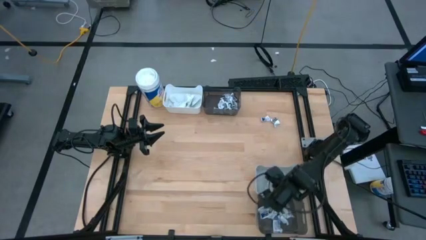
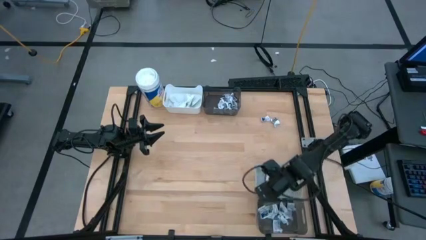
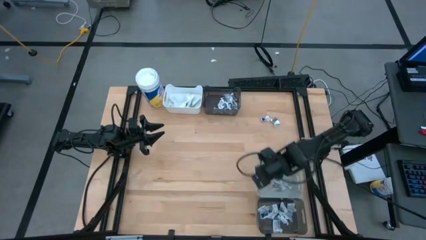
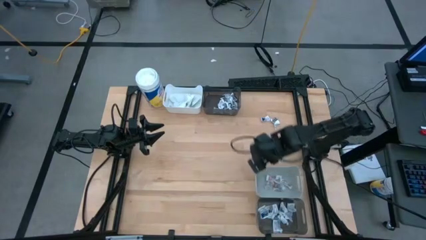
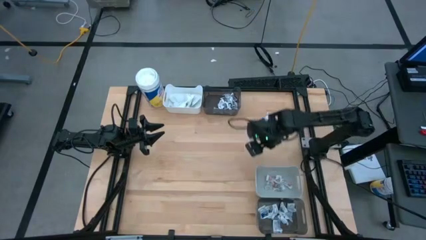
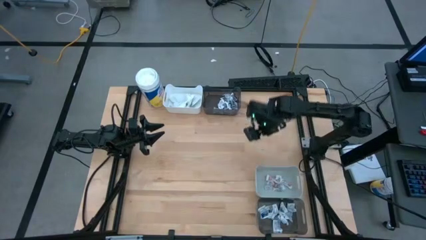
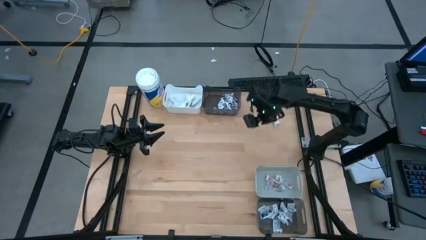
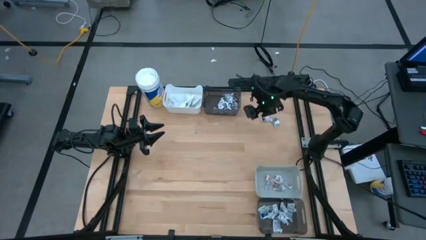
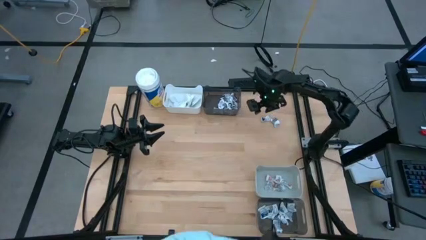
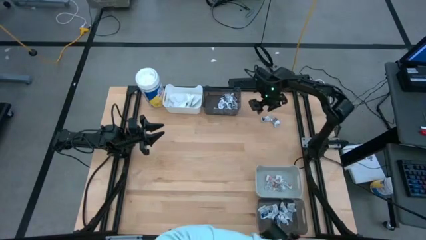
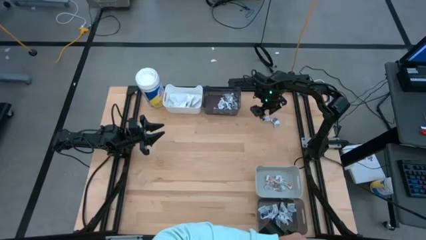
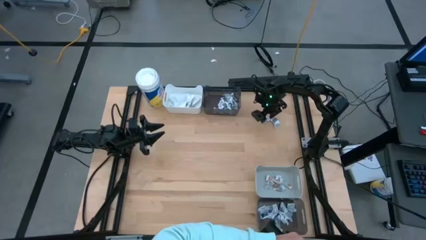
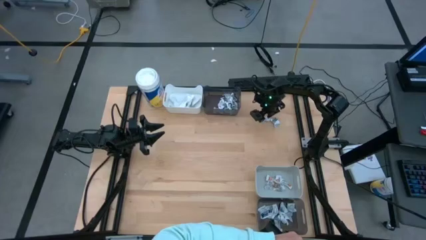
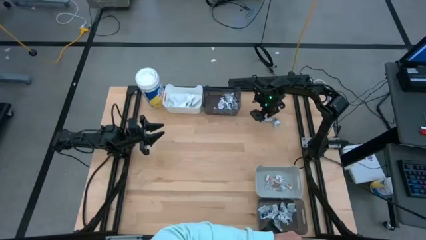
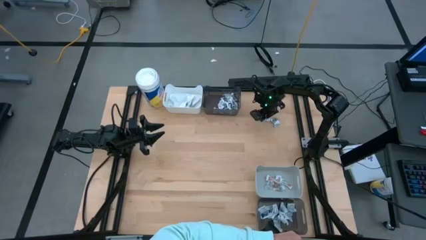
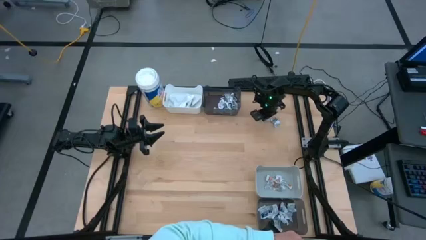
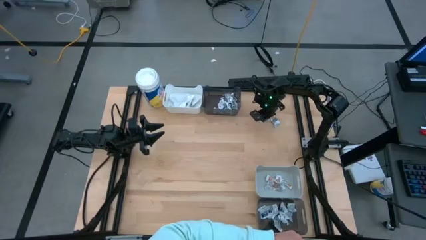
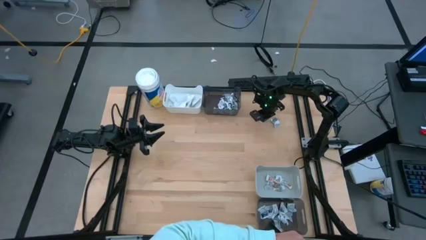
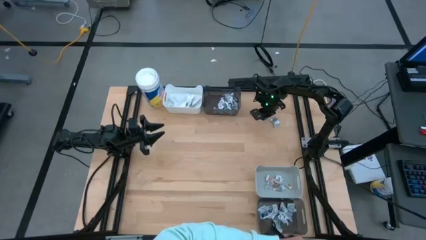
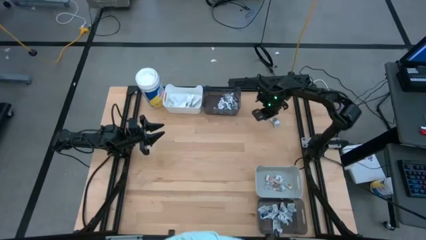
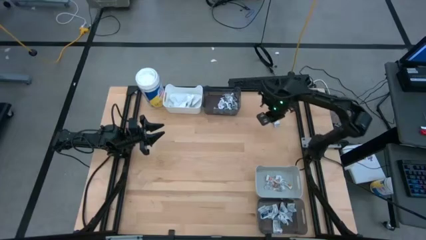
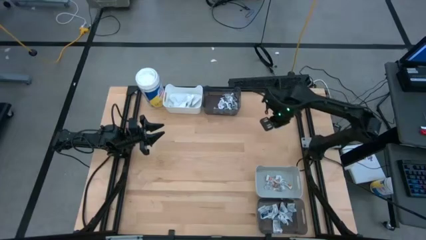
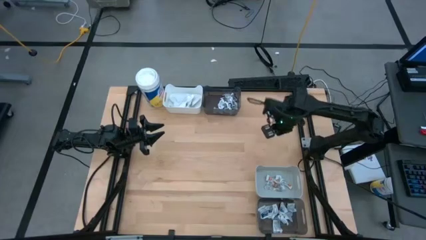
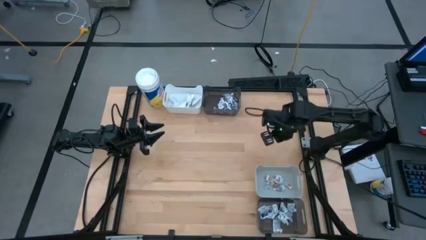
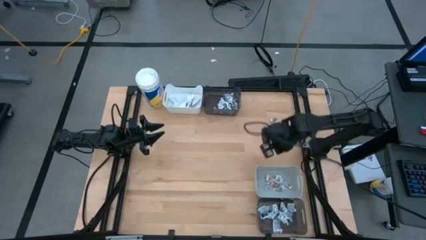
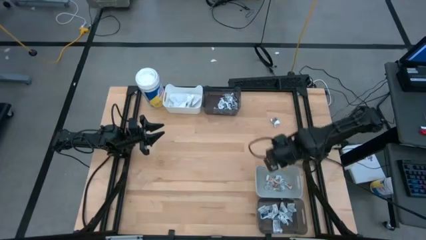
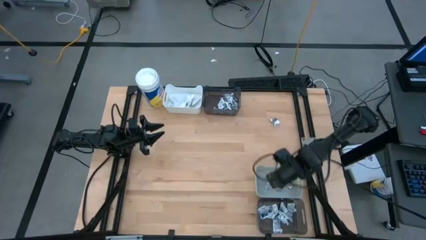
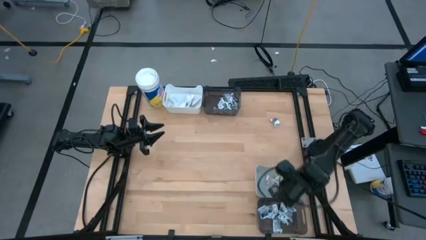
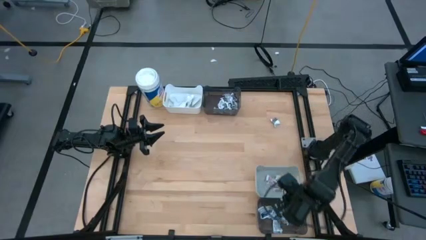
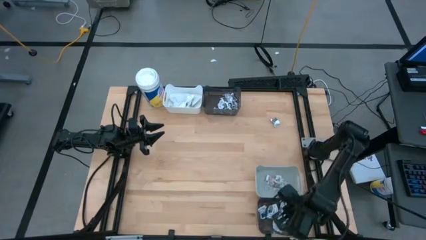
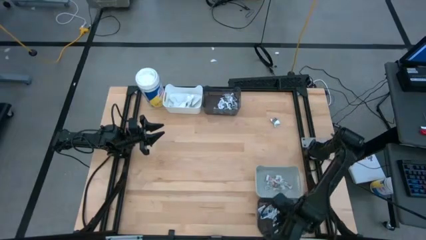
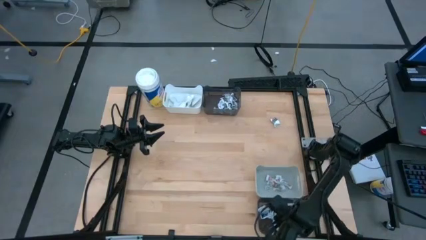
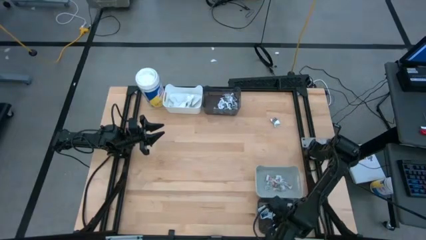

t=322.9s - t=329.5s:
Task: Pick & Place First Aid Supplies
Put the blue alcohol pad into the bottom black bin

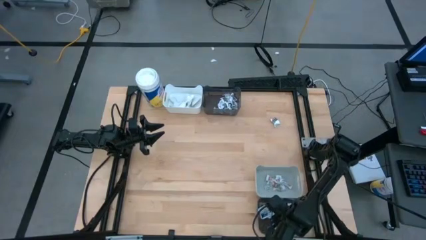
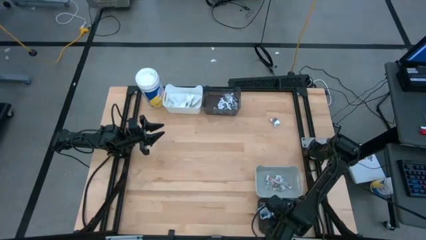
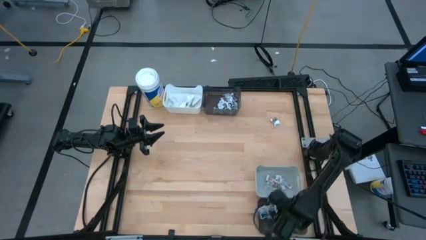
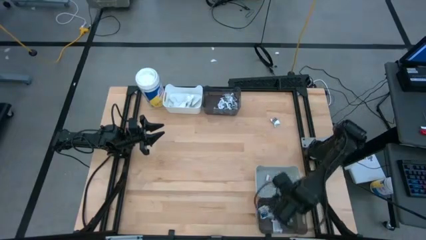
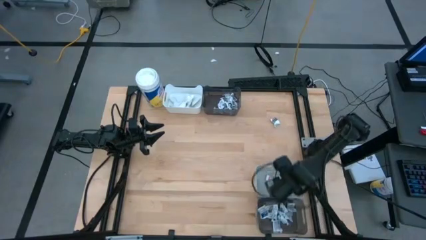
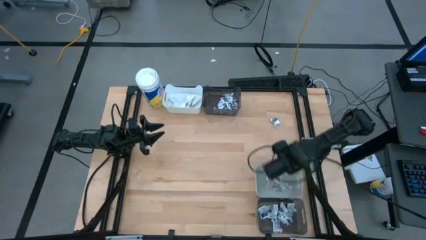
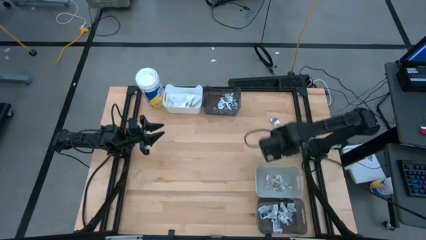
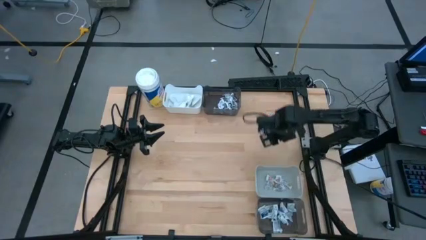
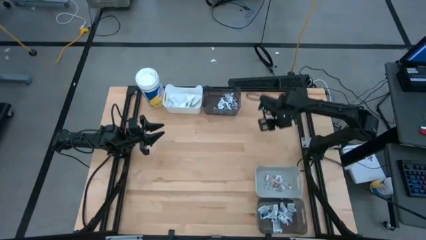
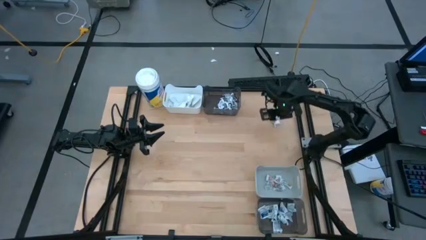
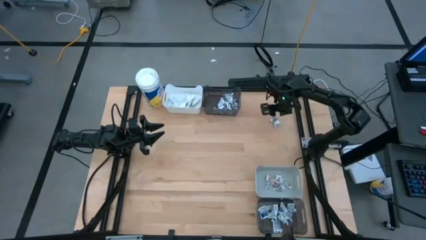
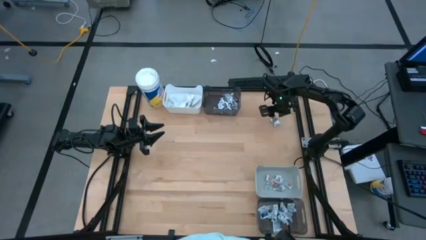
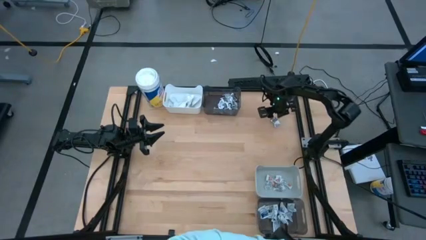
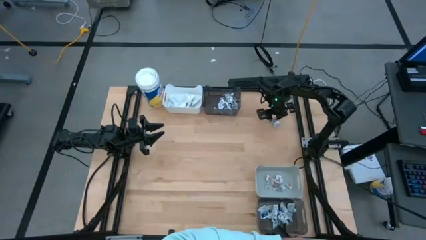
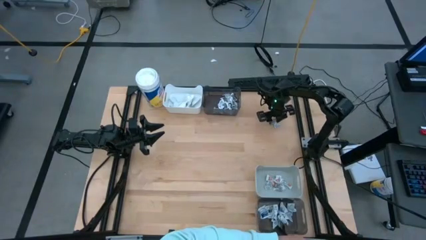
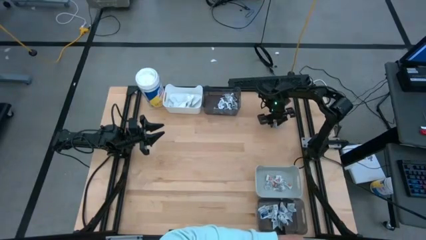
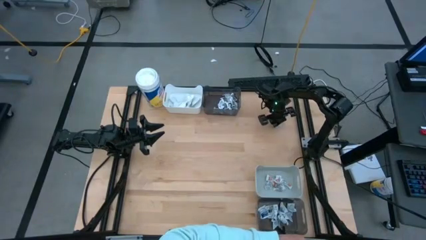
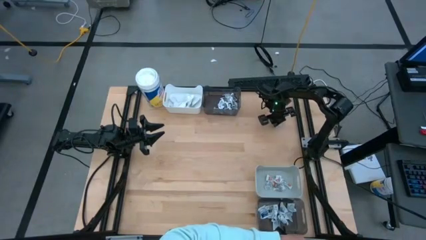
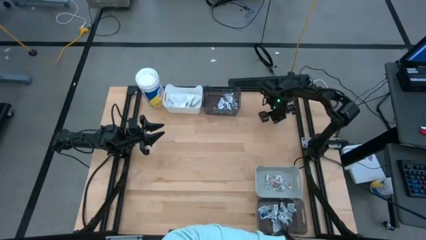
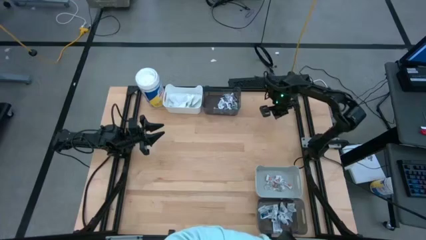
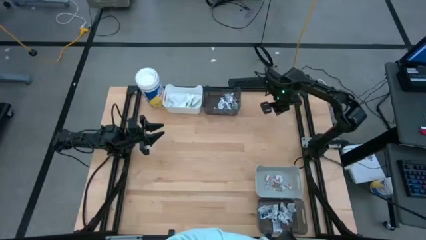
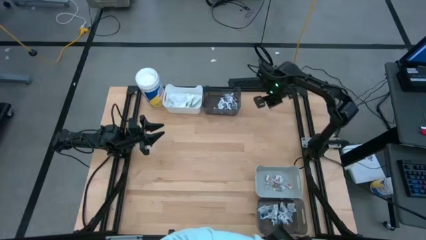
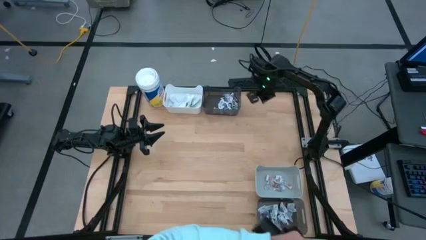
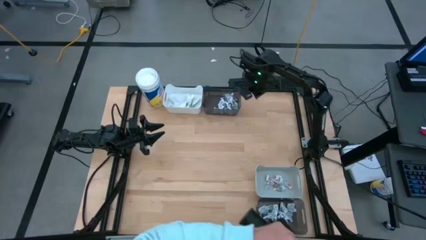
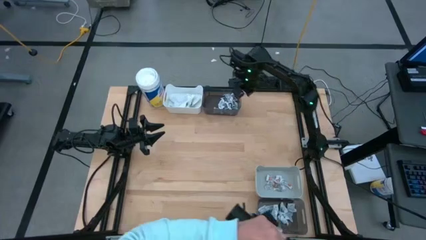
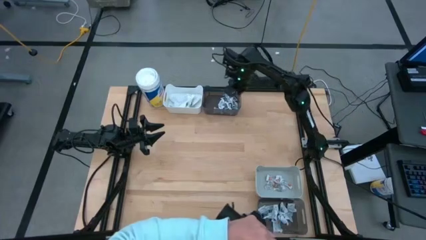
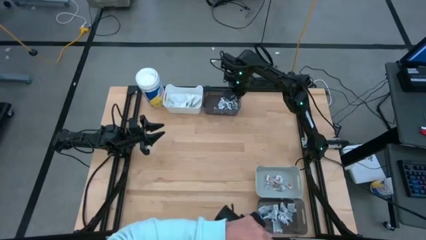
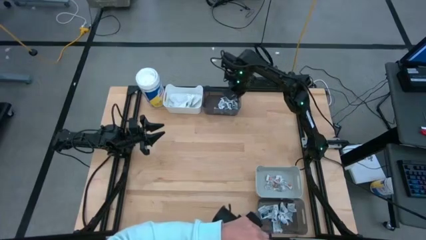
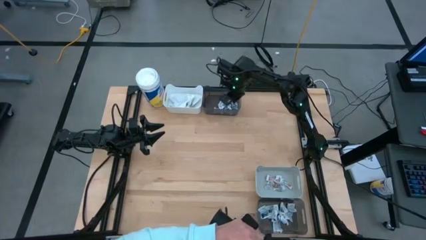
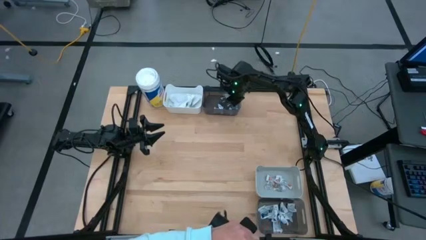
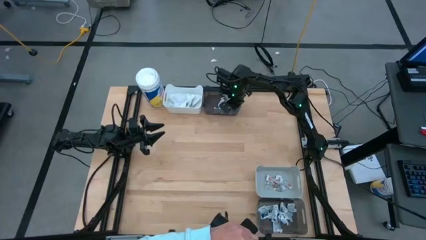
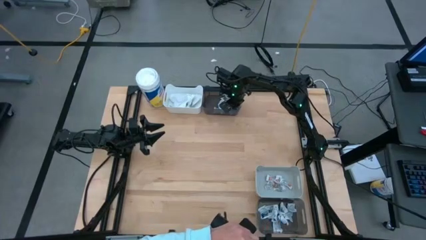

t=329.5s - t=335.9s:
Put the gray towelette pack into the top black bin

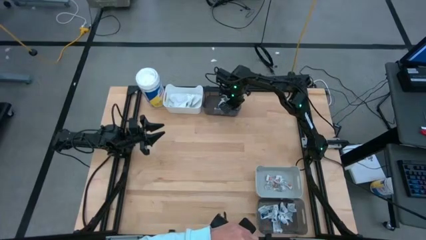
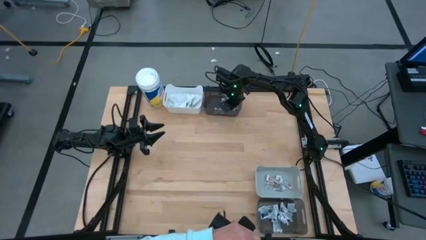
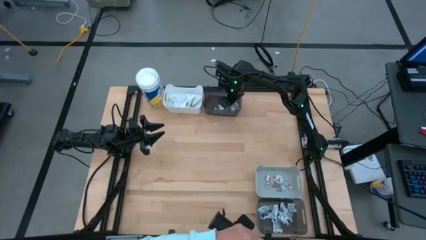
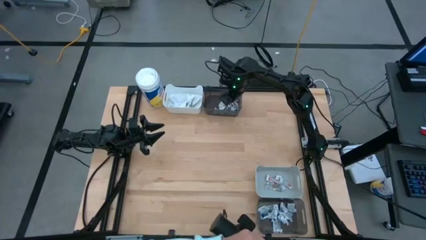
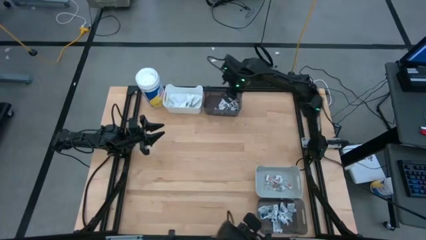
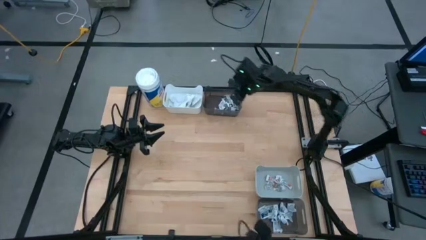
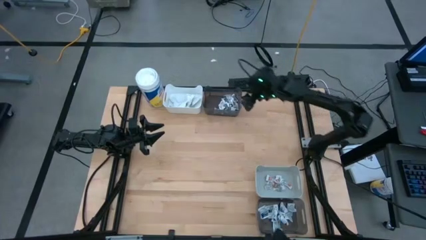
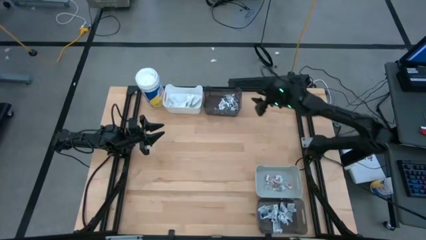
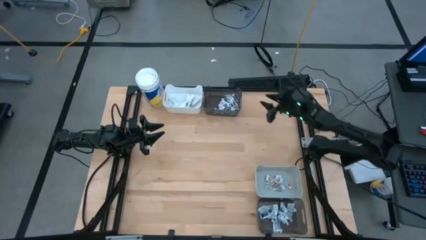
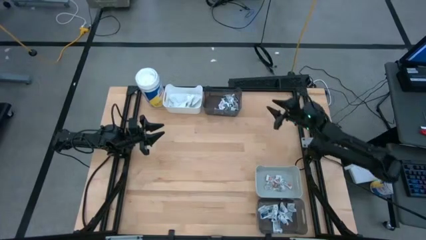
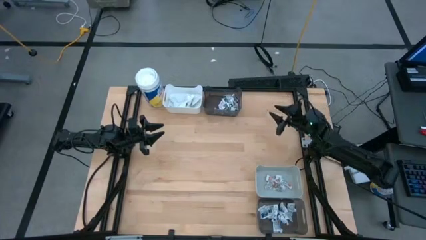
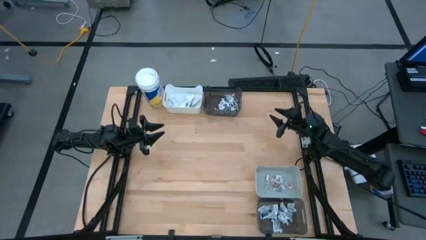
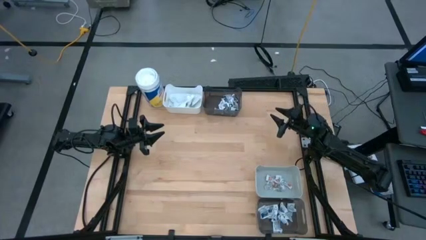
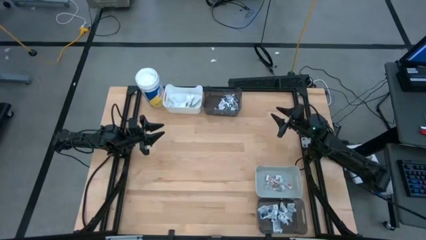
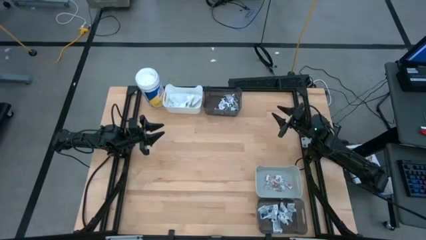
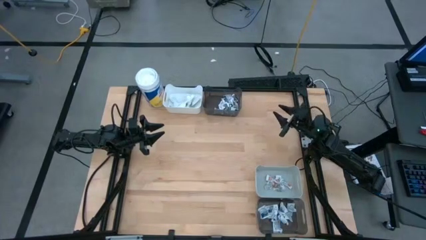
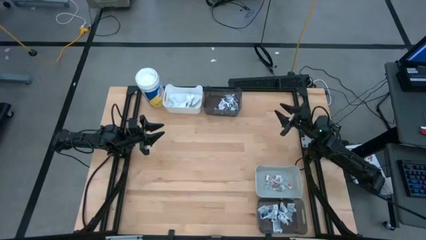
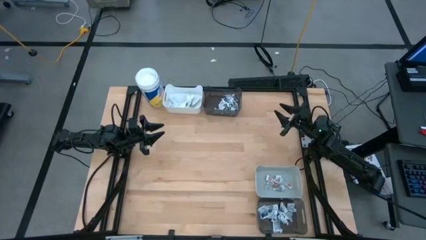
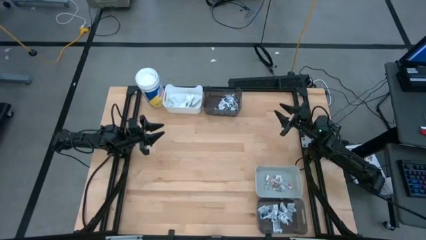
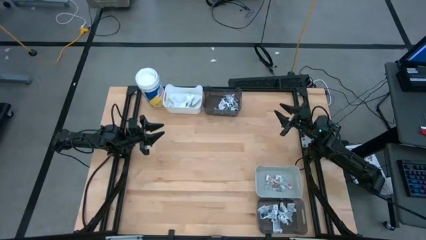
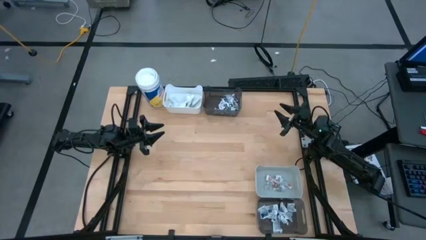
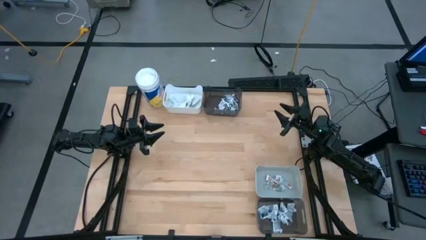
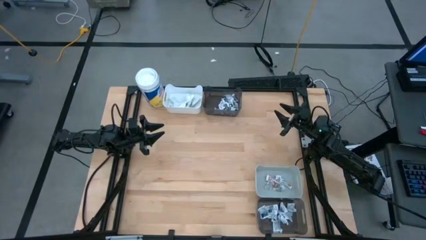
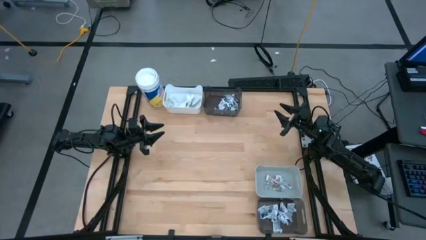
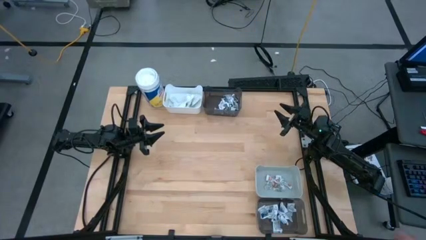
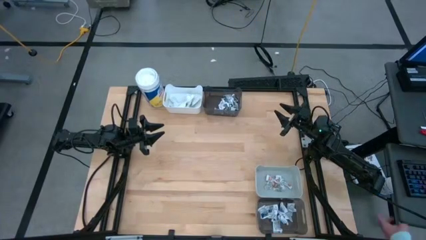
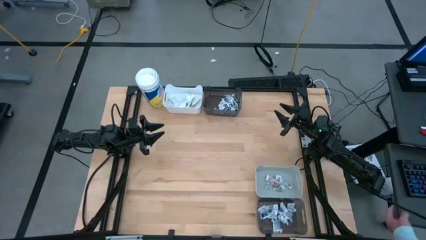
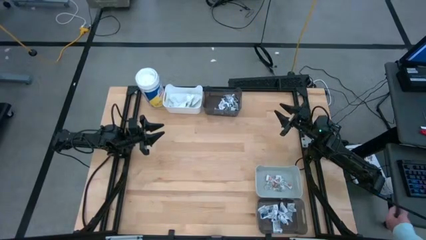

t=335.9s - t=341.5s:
Return to Home Position
